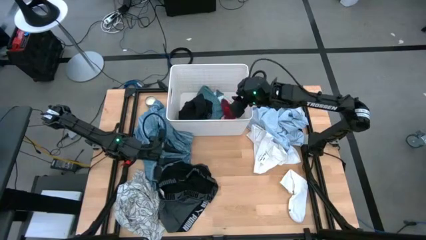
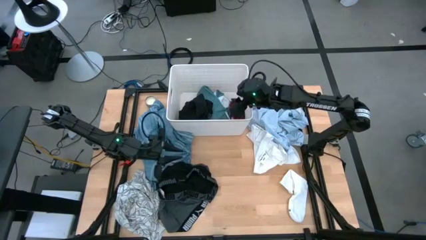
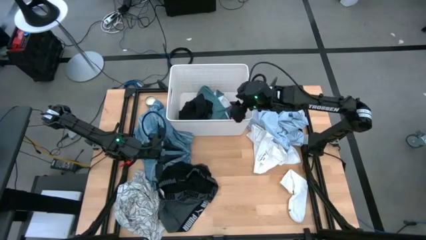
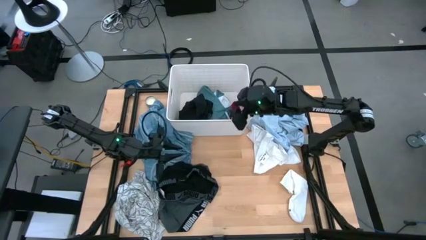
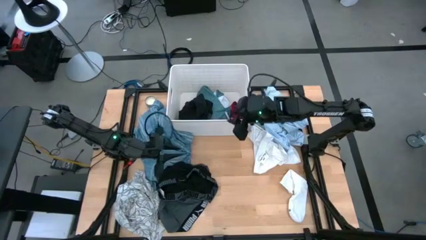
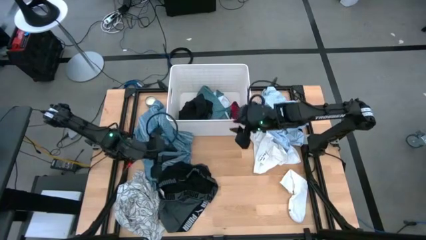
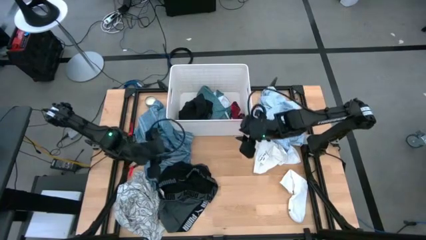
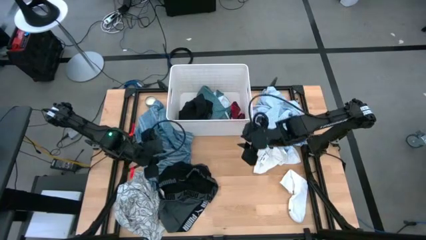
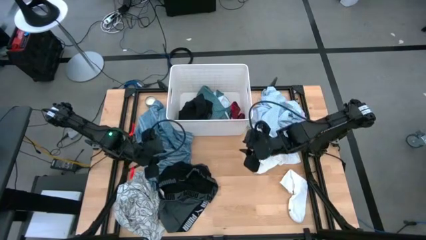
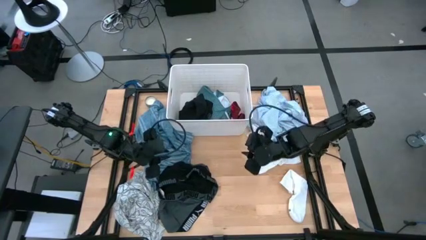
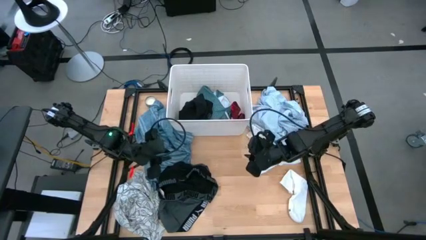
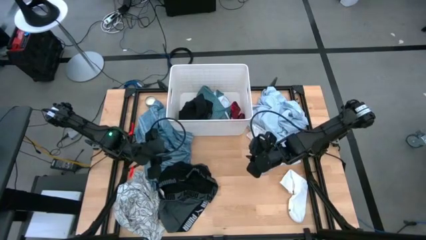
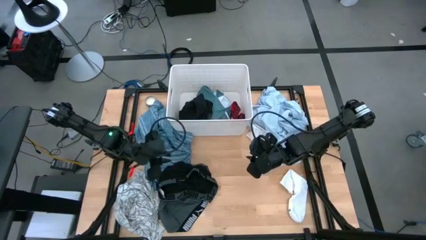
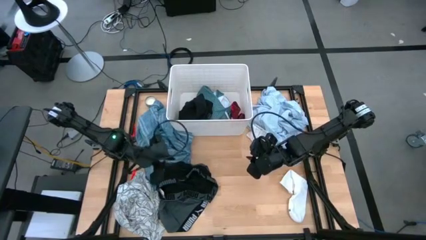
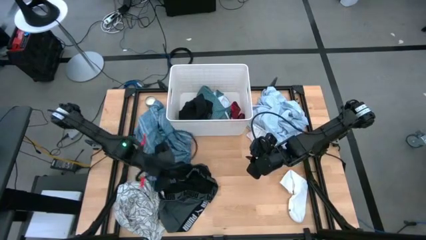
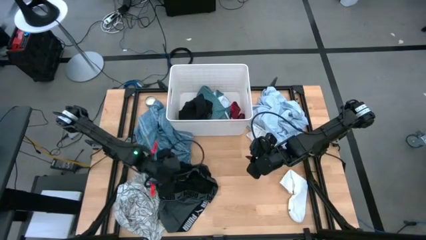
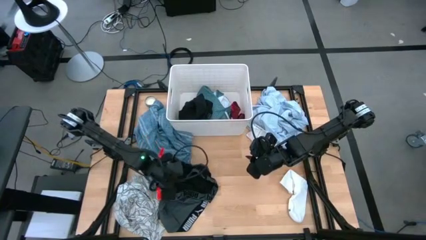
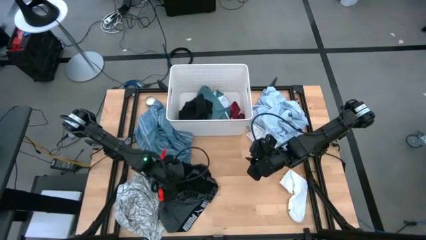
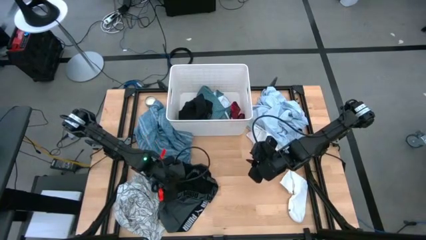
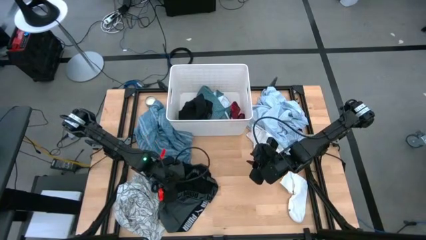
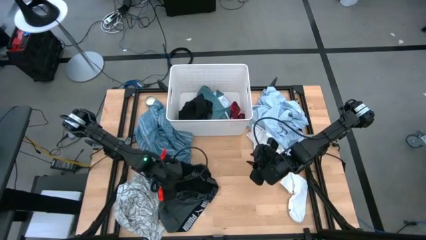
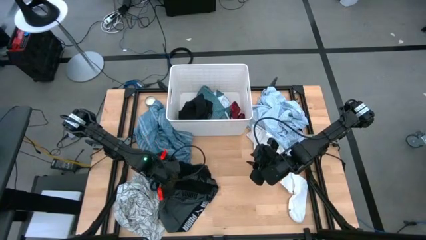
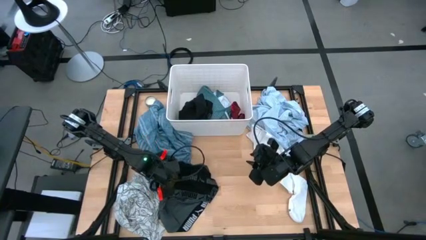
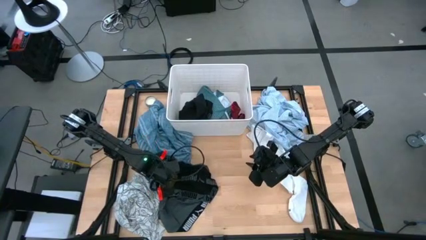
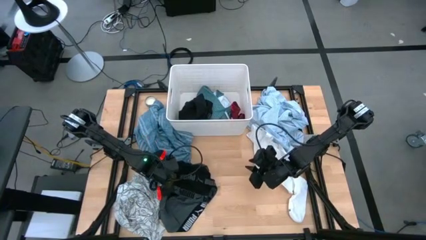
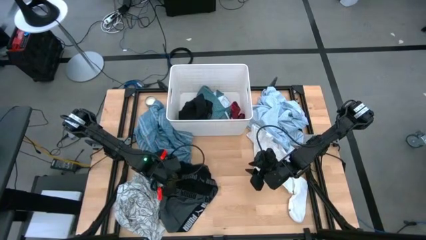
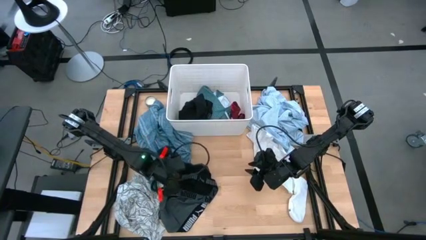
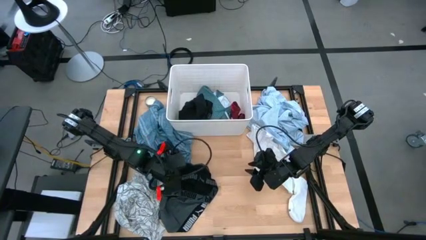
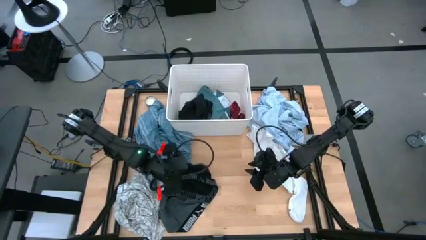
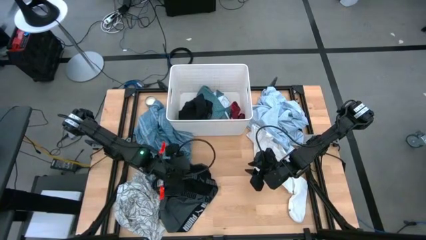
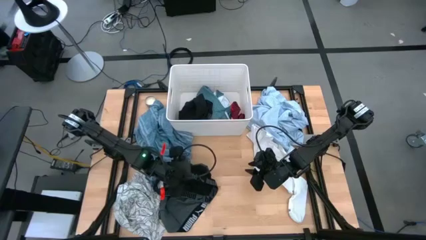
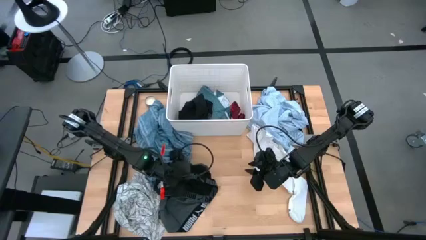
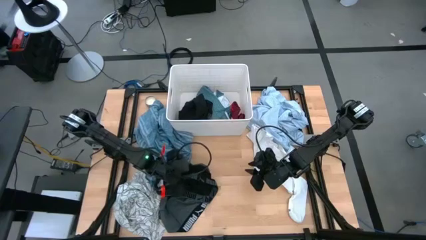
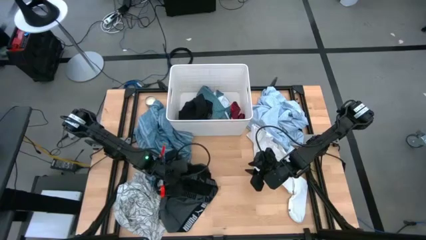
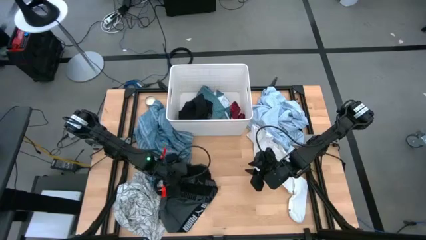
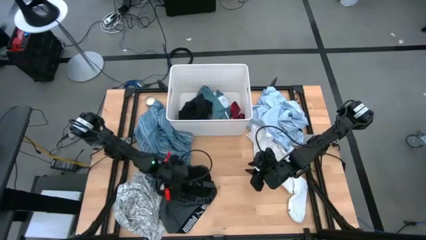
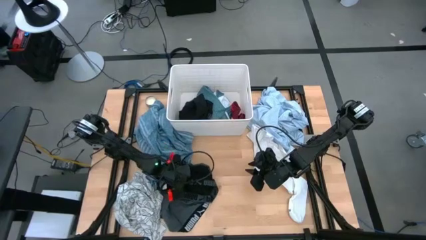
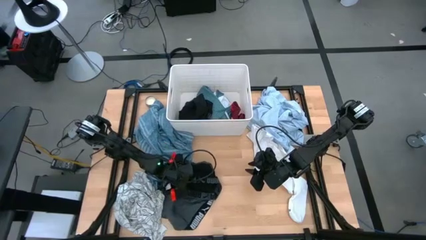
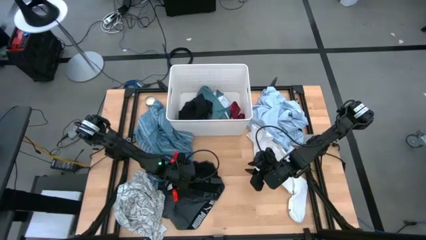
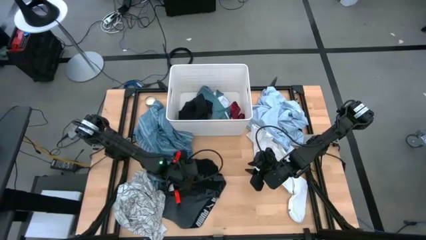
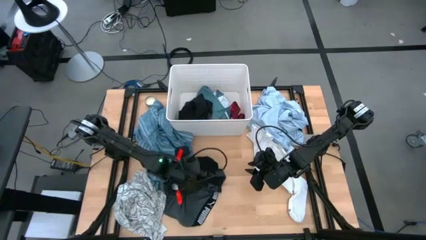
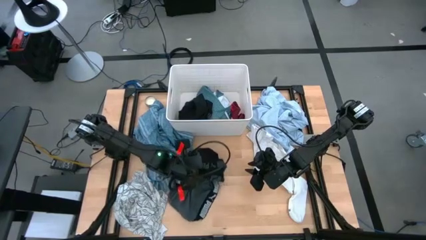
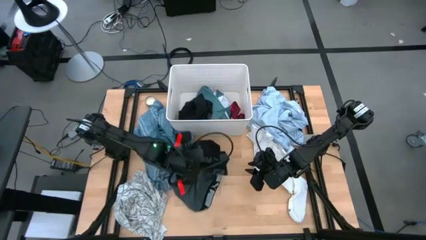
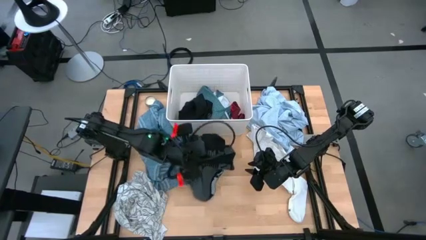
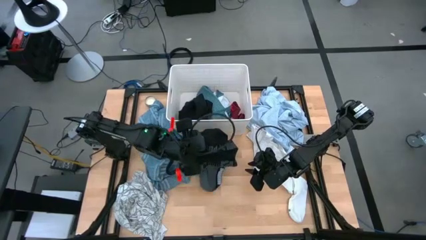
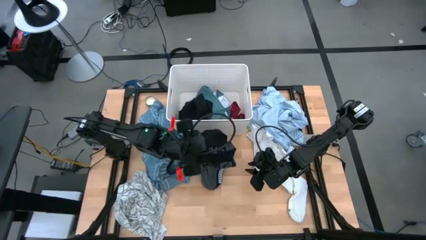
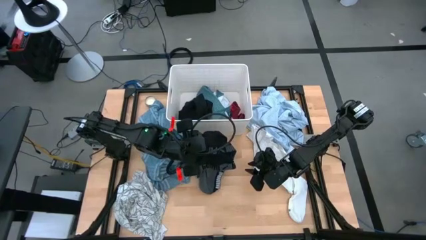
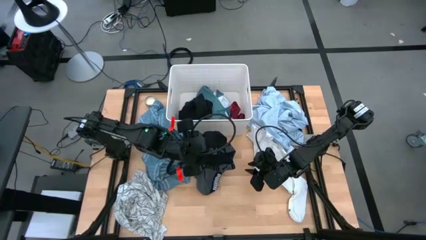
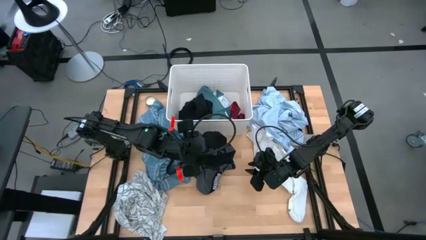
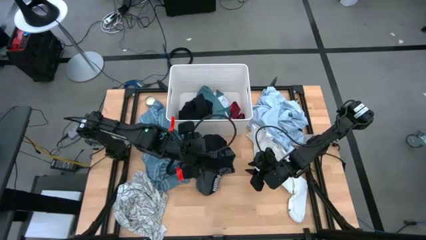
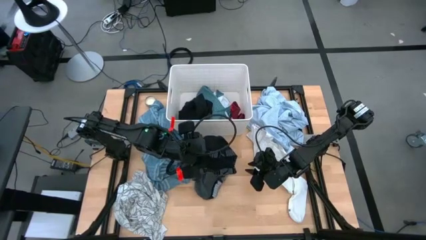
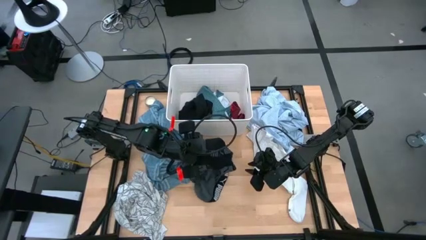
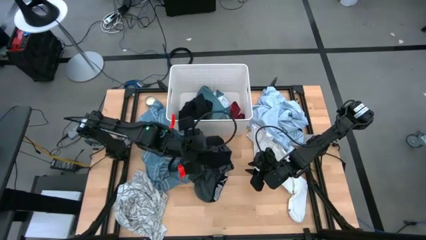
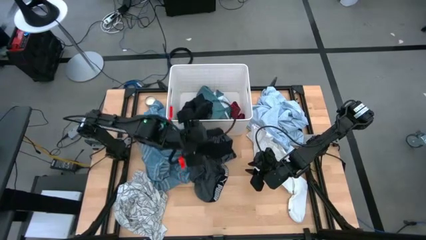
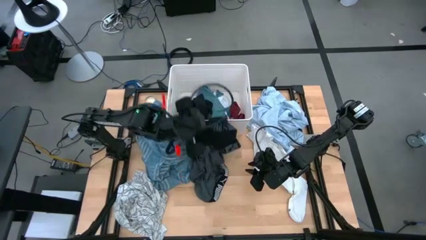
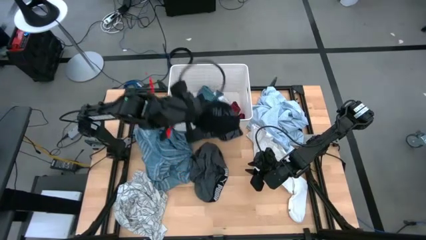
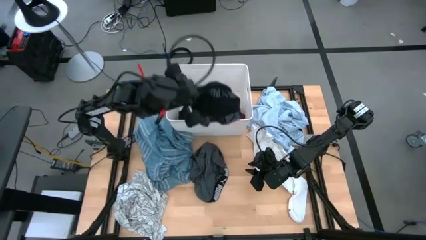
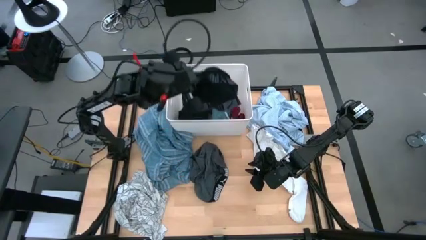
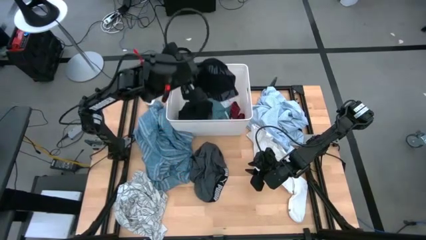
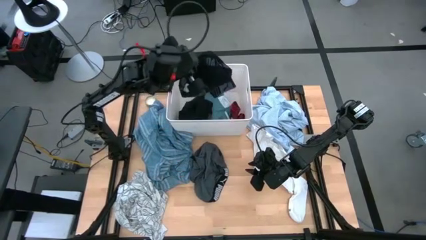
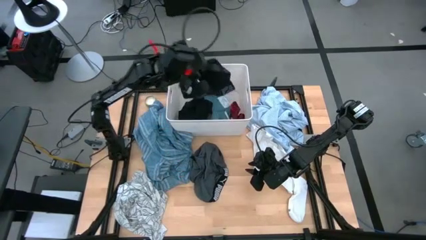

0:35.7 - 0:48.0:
Task: Sort clothes
Put the black boxers into the laundry bin

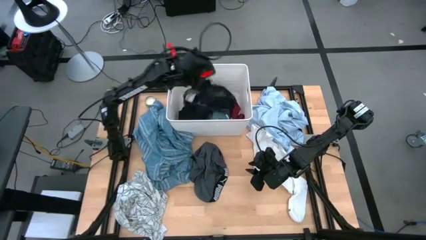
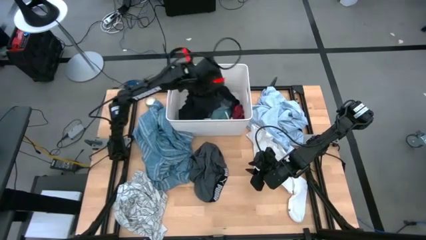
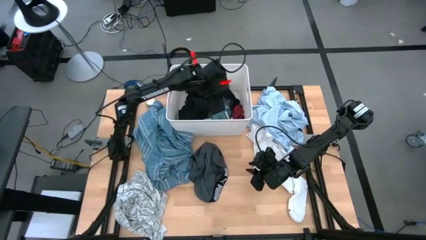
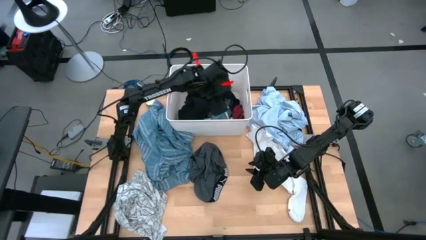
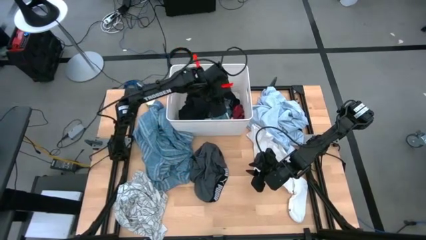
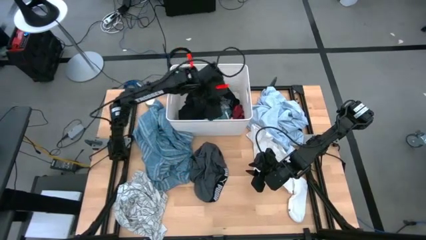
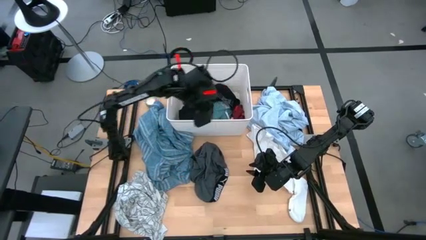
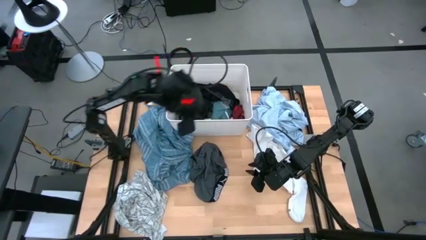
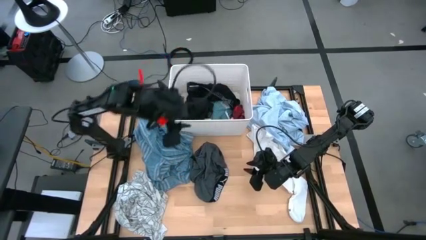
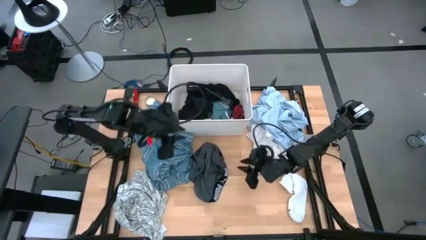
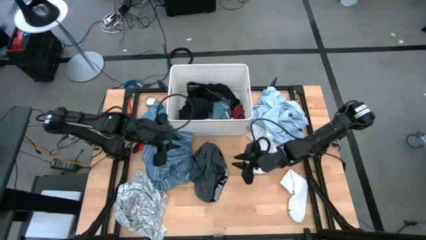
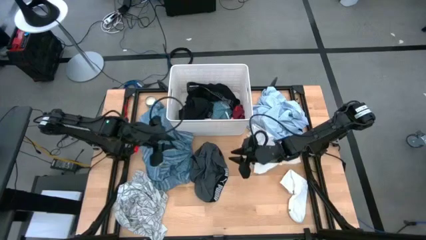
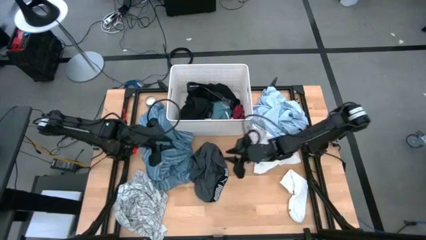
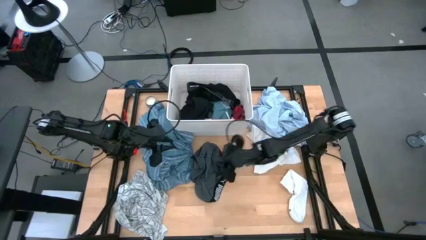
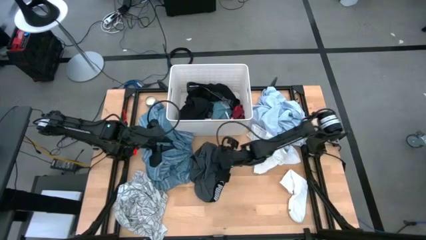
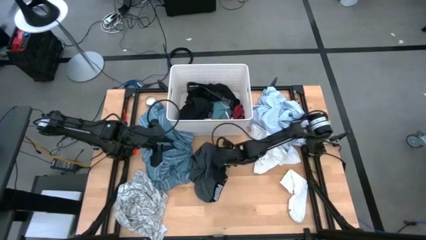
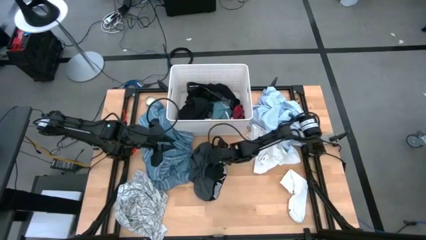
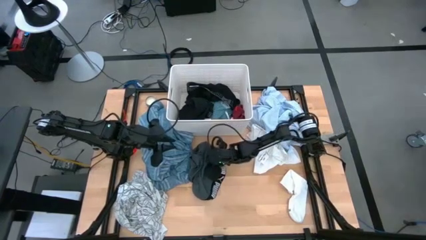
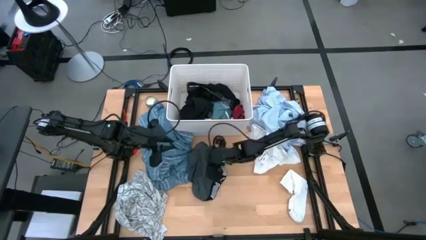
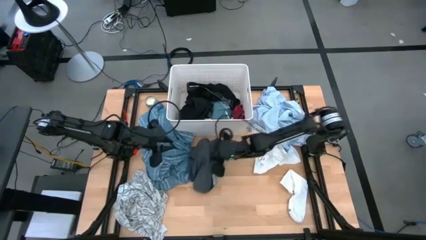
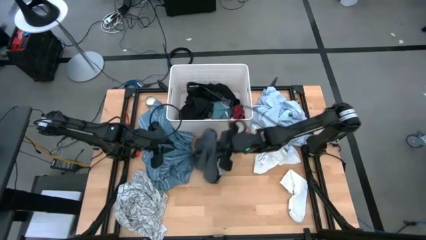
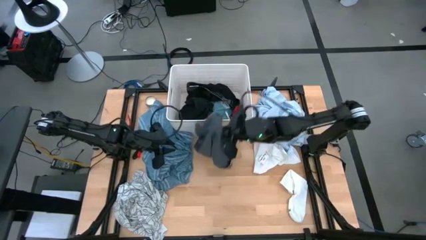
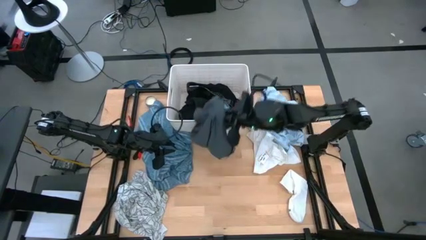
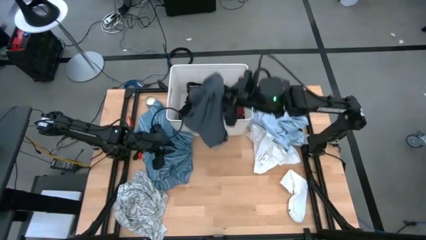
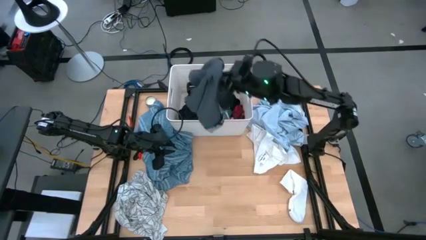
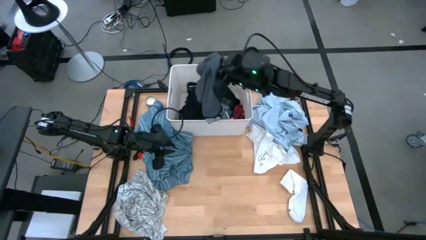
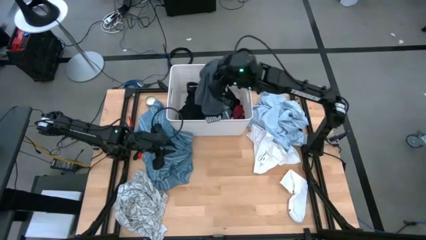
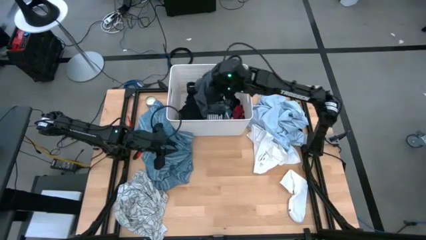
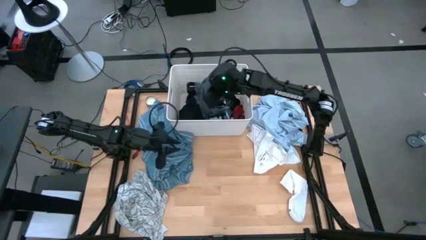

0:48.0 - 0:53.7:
Put the gray boxers into the laundry bin
